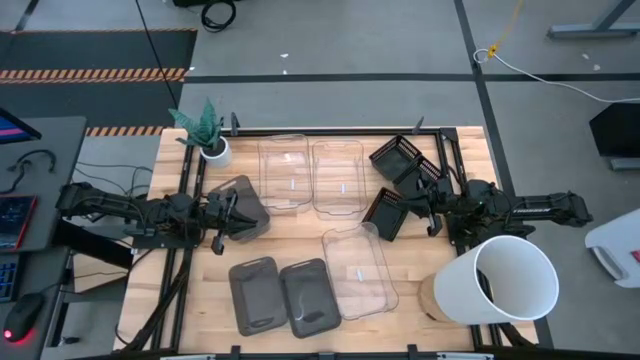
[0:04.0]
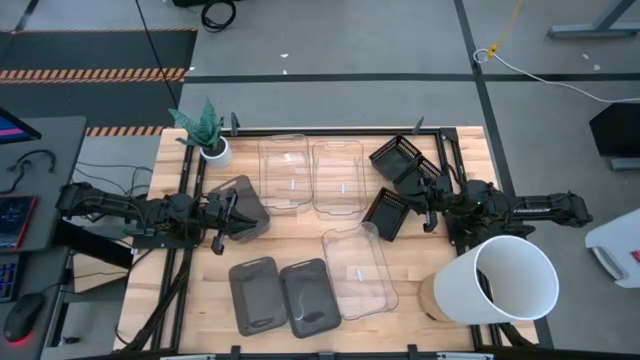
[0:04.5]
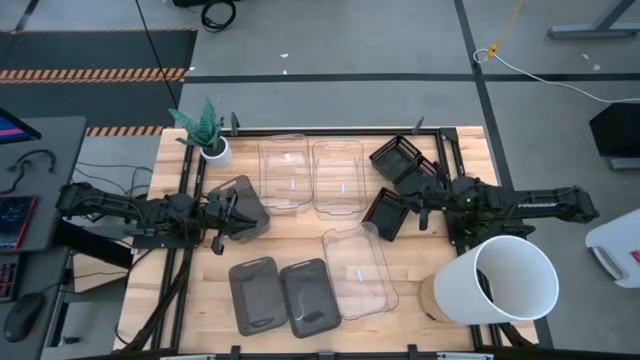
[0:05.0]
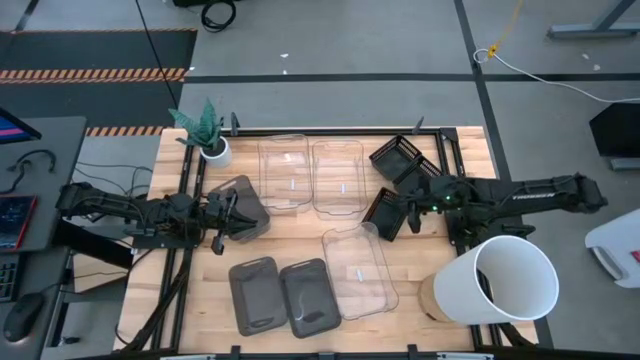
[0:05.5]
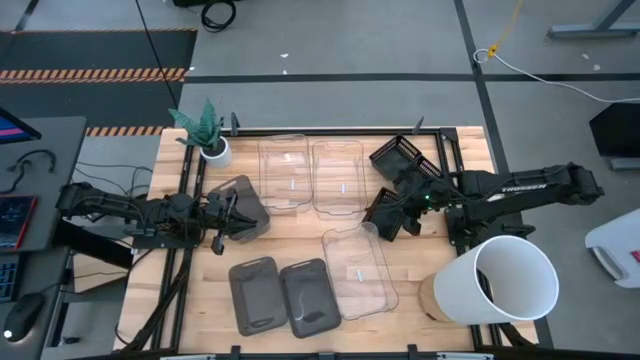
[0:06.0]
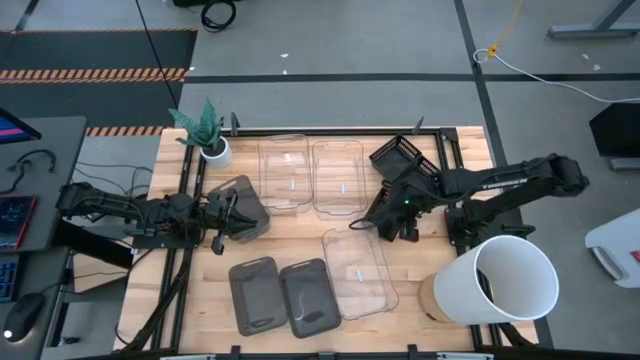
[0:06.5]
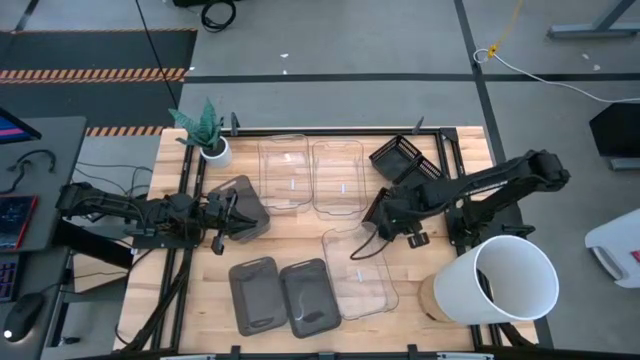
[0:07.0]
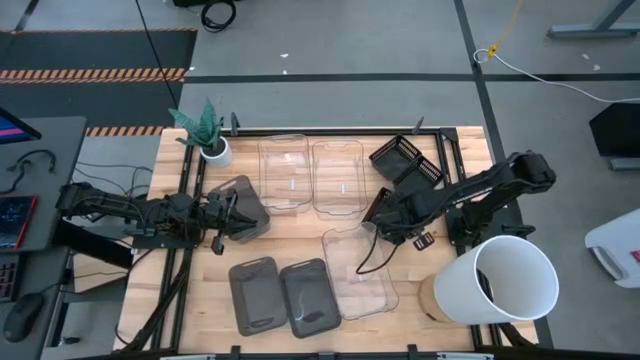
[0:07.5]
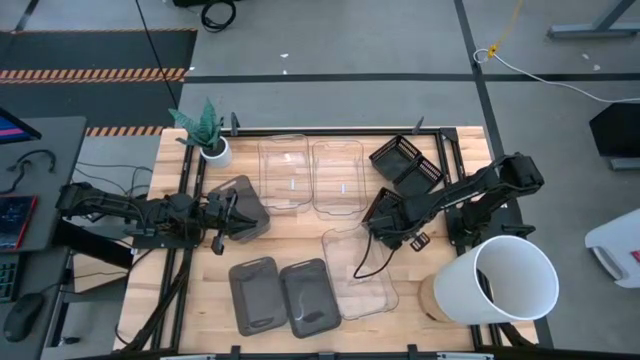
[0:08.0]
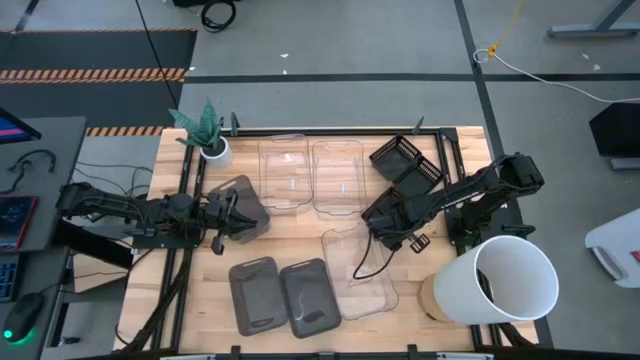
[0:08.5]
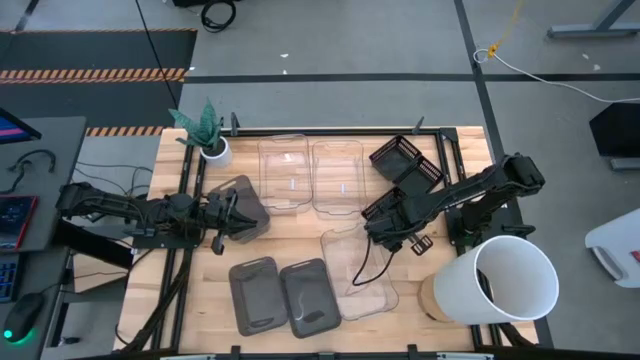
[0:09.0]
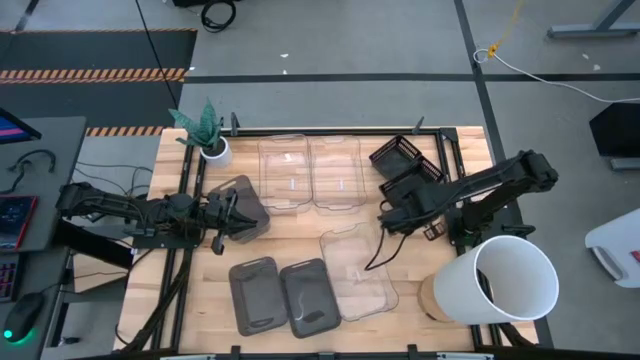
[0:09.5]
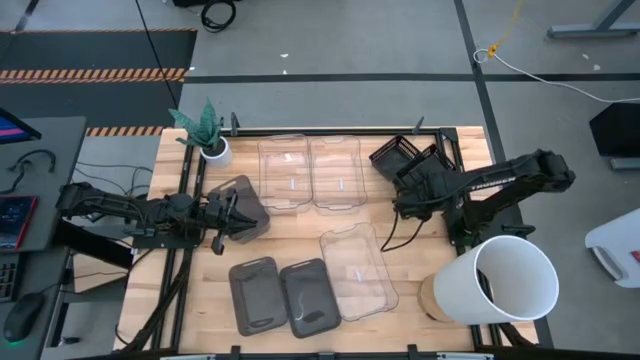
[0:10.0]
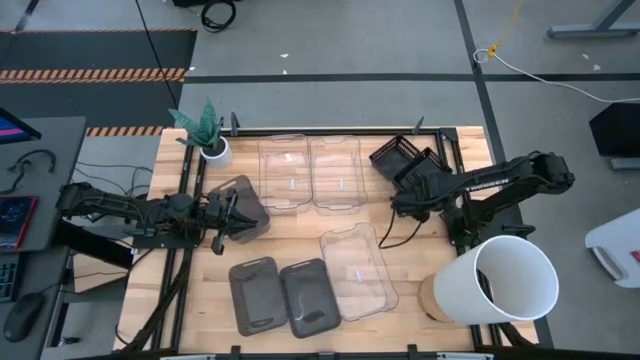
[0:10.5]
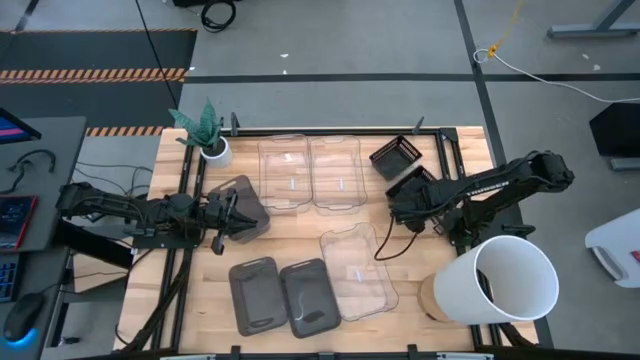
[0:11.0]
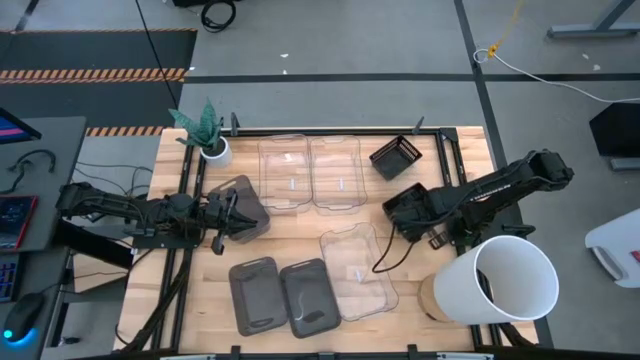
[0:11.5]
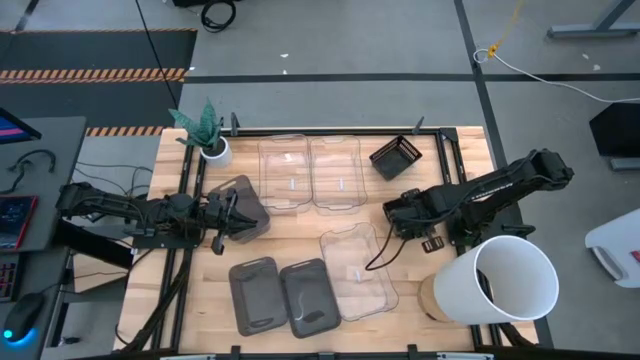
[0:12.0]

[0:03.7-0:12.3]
Stack the bottom black bin on the top right black bin

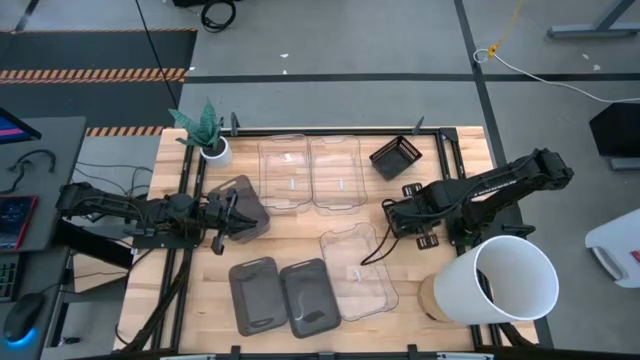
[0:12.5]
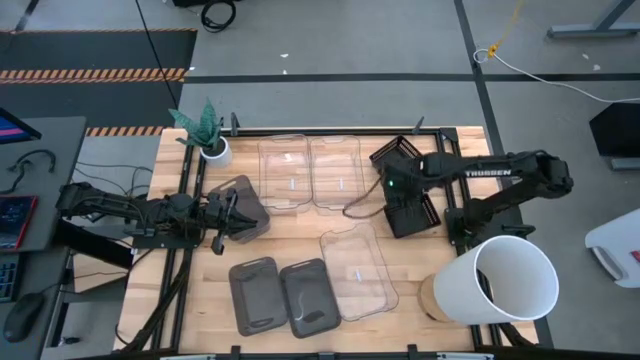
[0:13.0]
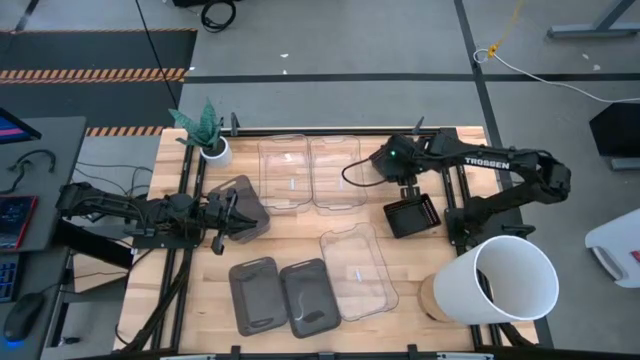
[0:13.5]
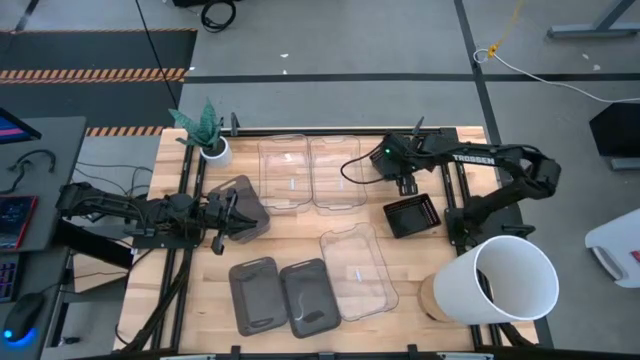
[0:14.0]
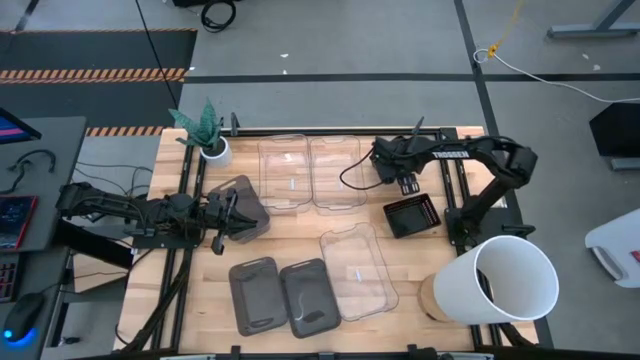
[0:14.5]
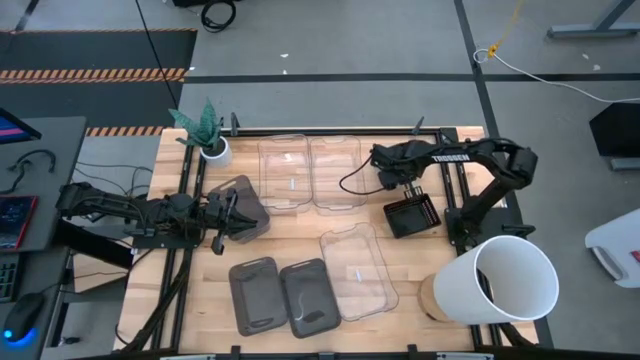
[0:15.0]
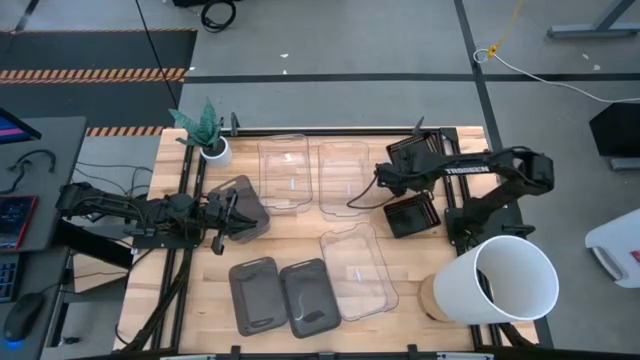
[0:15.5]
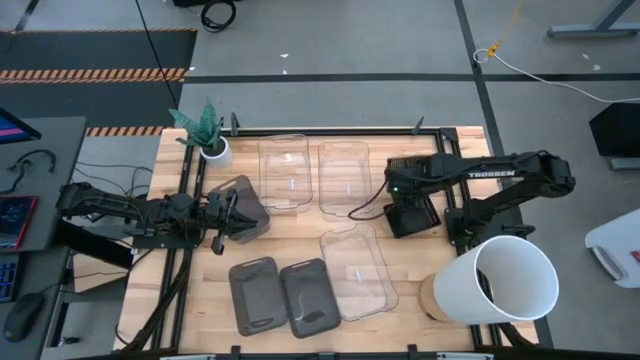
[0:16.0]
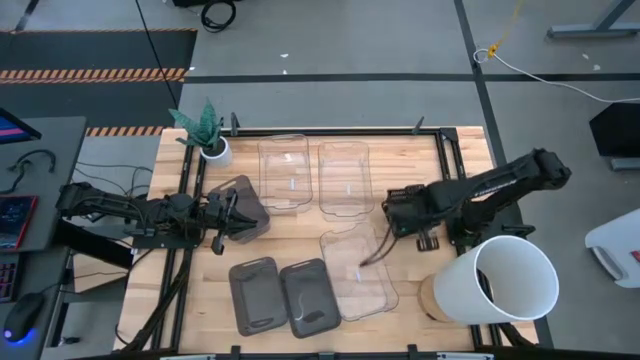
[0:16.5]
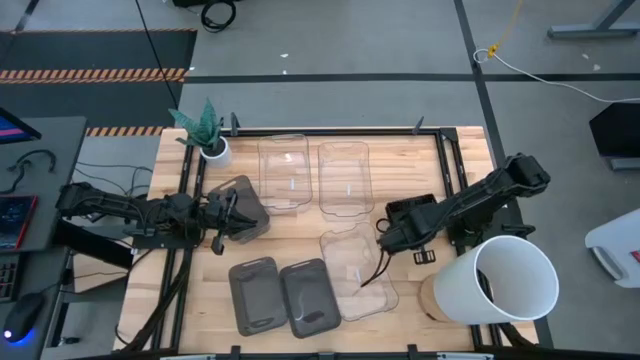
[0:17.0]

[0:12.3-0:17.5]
Stack the top black bin on the stacked bottom black bin

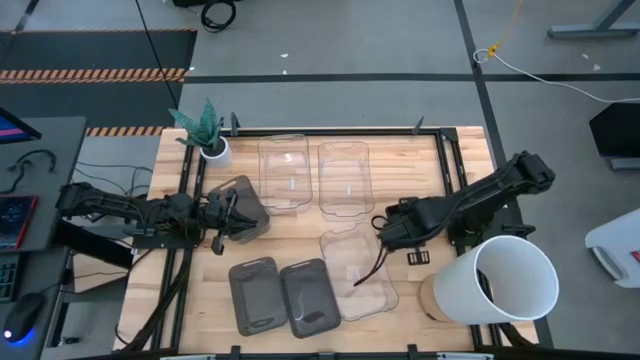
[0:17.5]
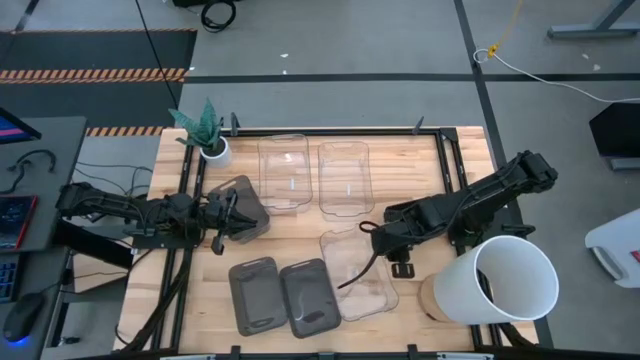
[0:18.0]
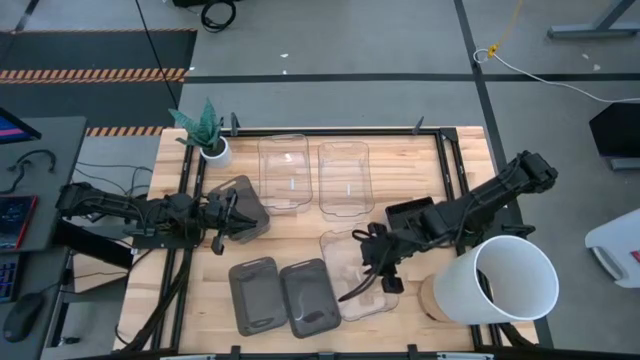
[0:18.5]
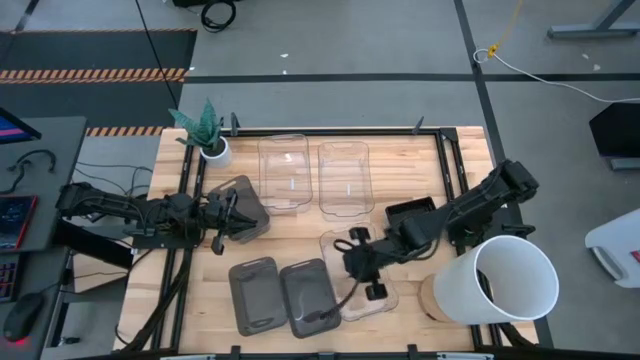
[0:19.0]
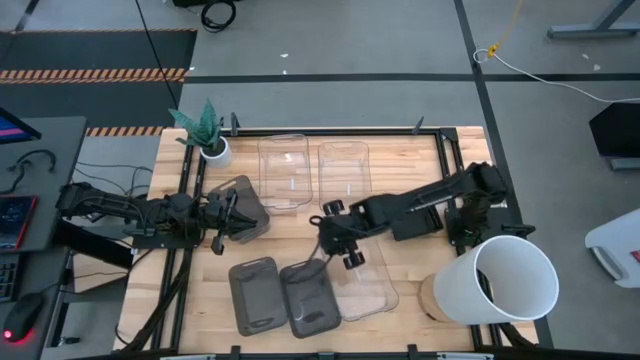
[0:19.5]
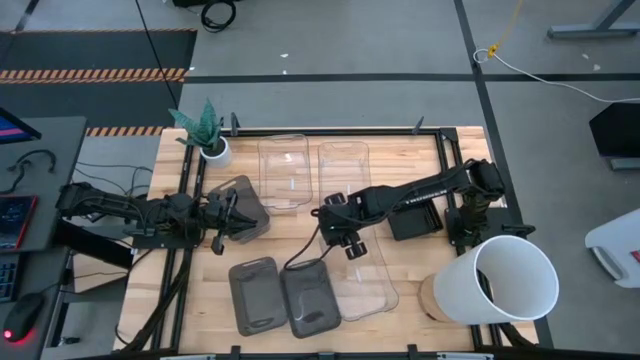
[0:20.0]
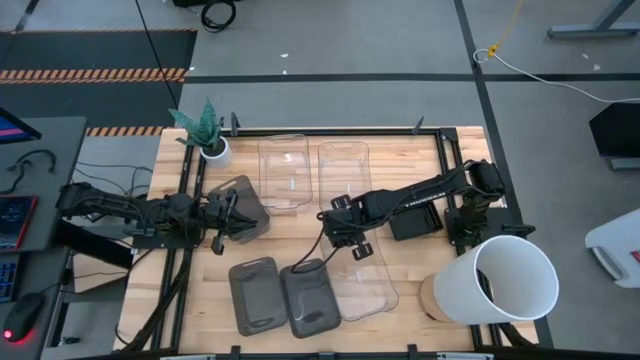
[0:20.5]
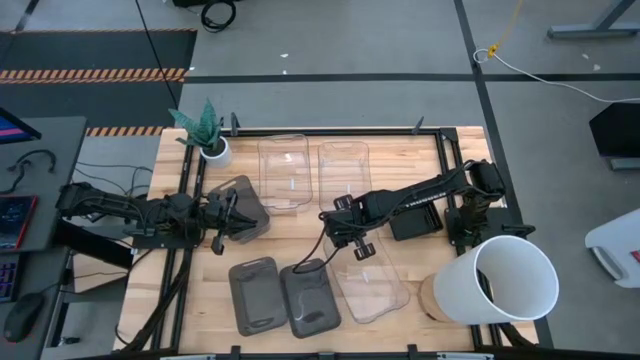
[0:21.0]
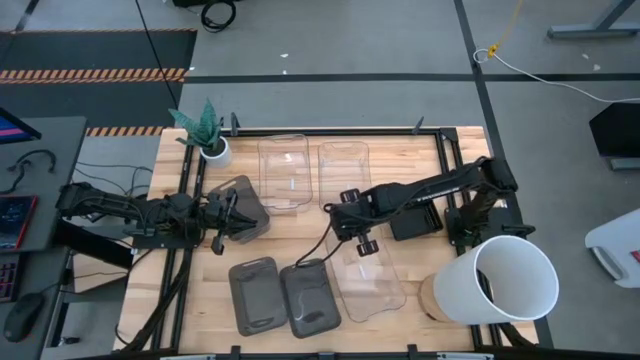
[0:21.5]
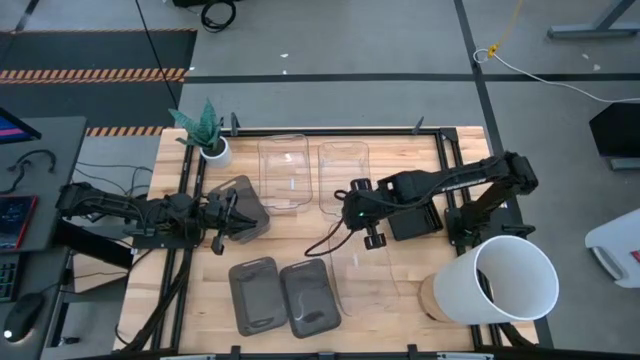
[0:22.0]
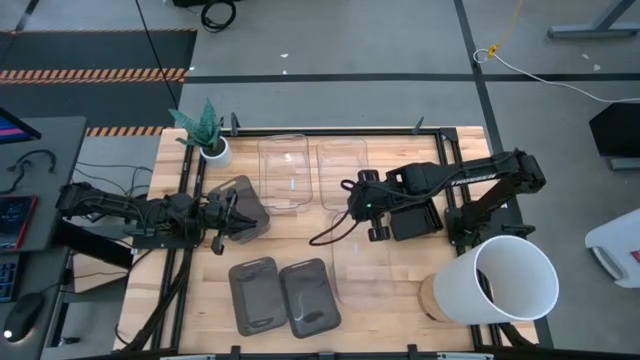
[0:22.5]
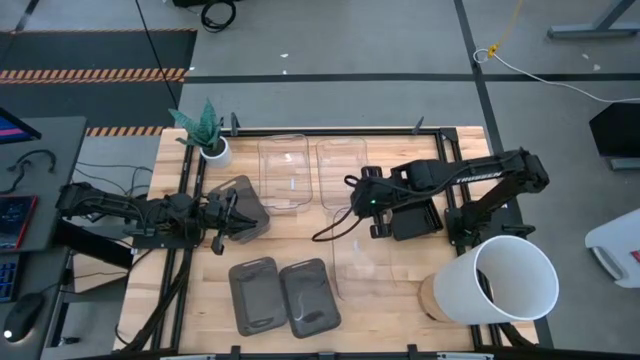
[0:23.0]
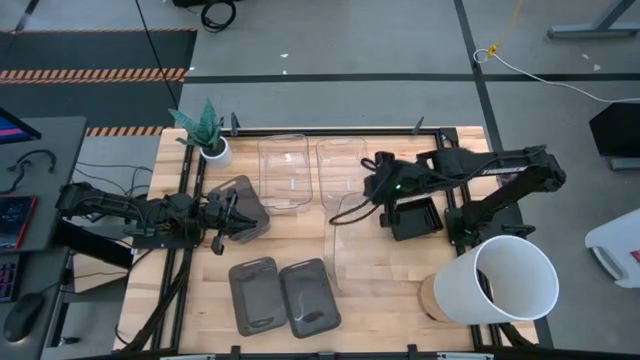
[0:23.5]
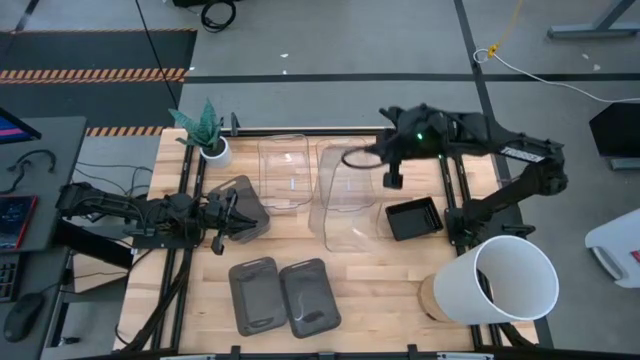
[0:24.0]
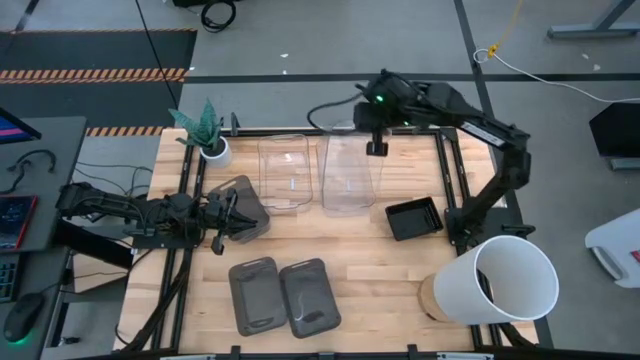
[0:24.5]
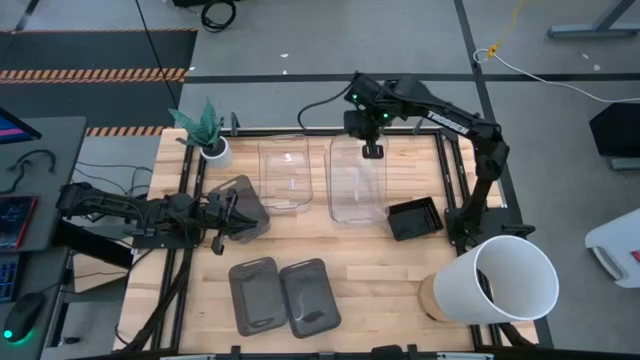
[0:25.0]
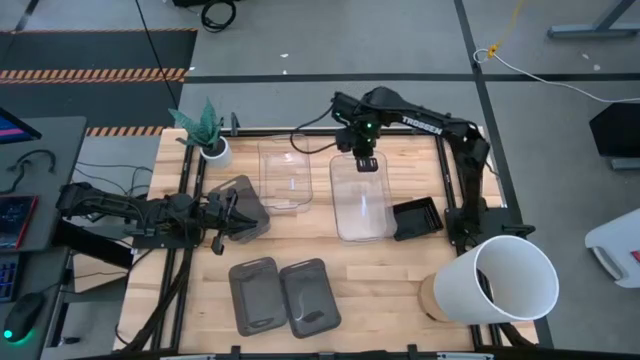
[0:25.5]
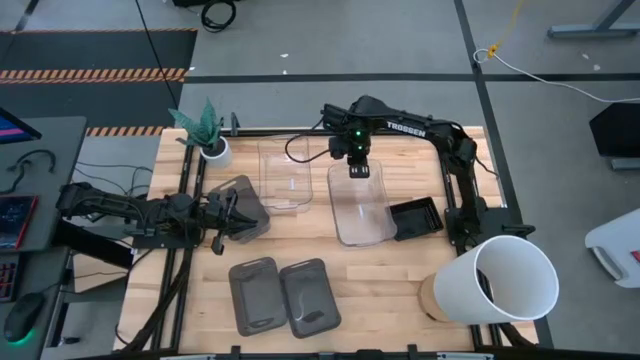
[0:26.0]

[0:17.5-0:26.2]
Stack the bottom transparent bin on the top right transparent bin
